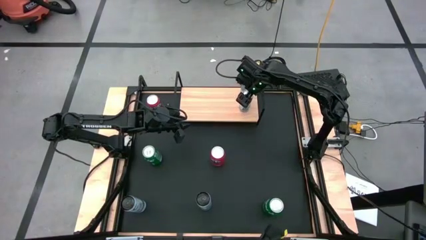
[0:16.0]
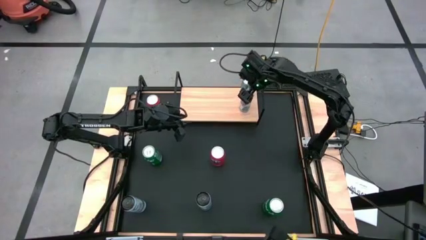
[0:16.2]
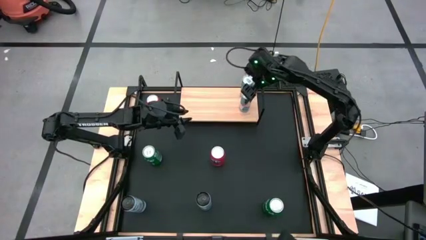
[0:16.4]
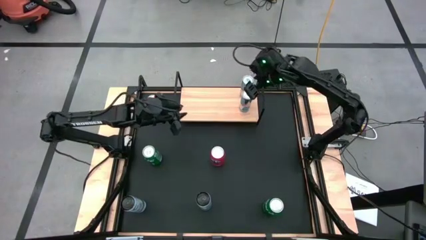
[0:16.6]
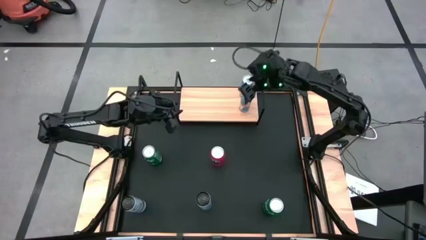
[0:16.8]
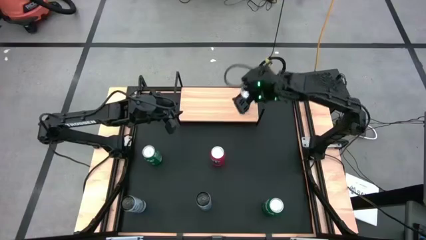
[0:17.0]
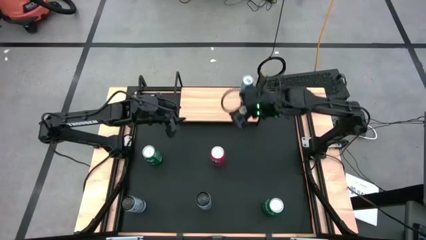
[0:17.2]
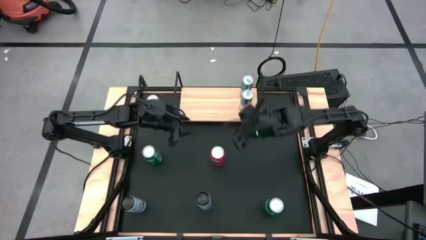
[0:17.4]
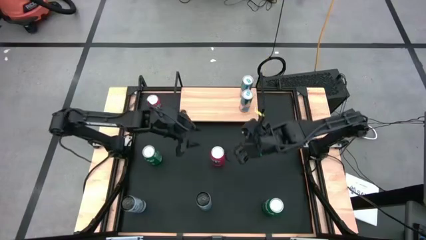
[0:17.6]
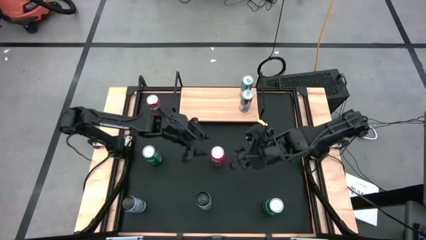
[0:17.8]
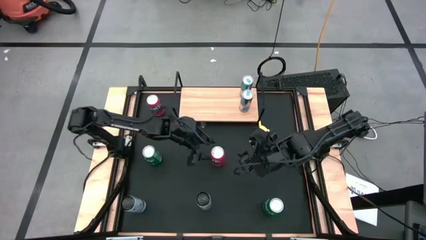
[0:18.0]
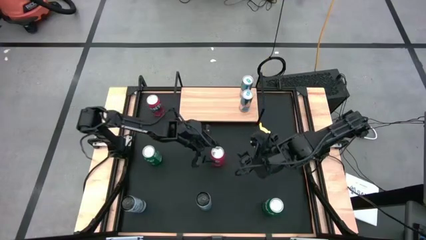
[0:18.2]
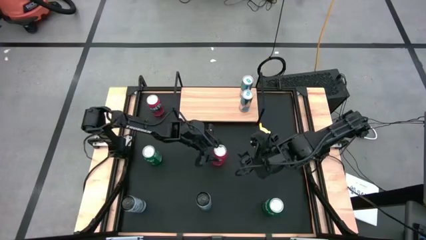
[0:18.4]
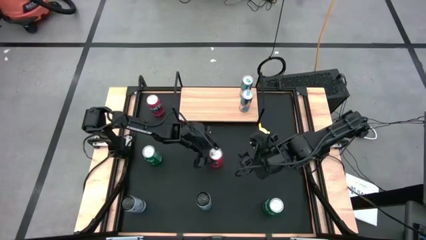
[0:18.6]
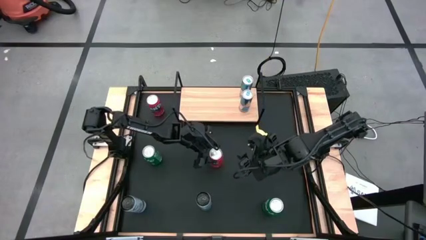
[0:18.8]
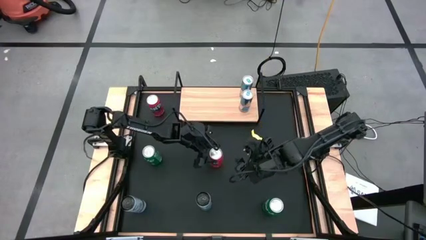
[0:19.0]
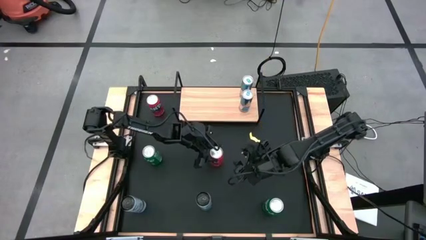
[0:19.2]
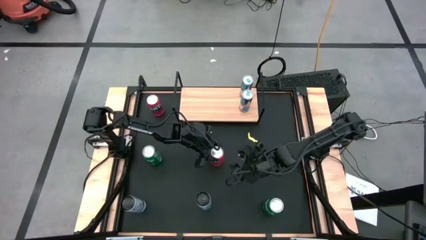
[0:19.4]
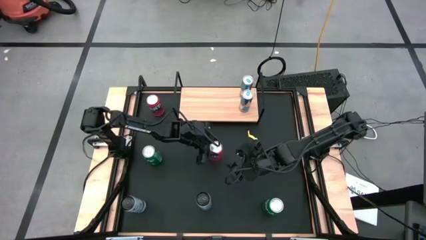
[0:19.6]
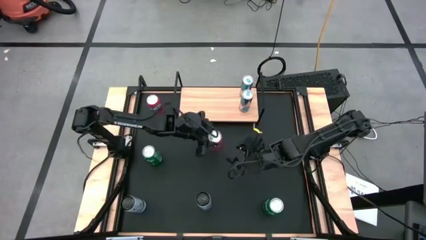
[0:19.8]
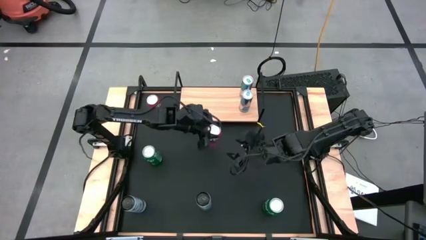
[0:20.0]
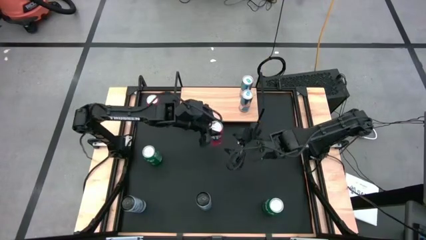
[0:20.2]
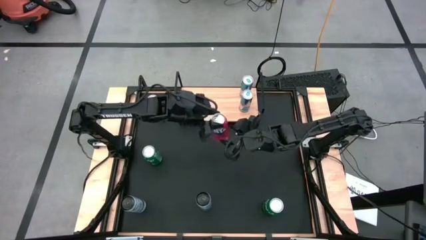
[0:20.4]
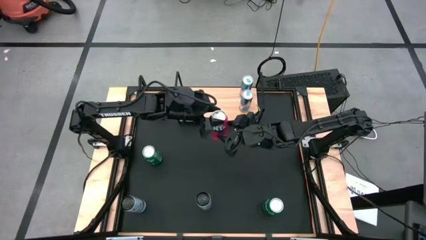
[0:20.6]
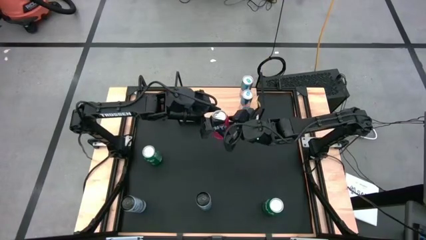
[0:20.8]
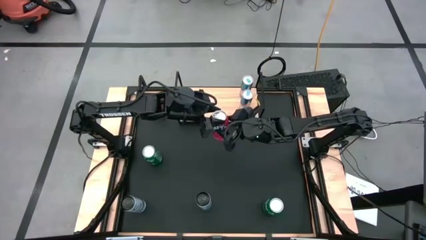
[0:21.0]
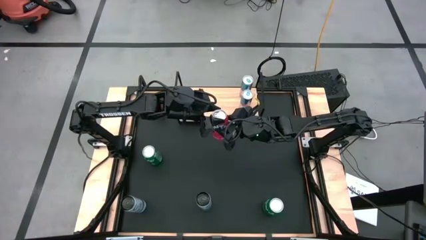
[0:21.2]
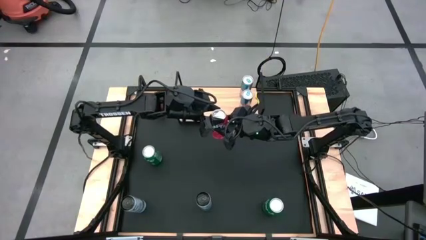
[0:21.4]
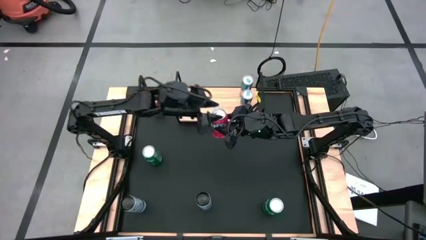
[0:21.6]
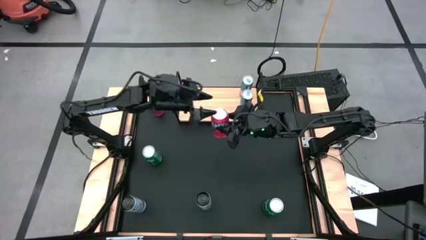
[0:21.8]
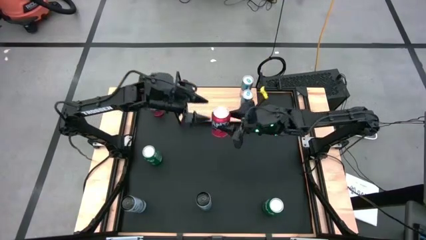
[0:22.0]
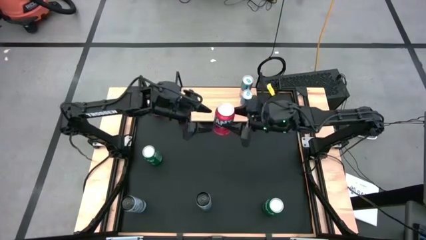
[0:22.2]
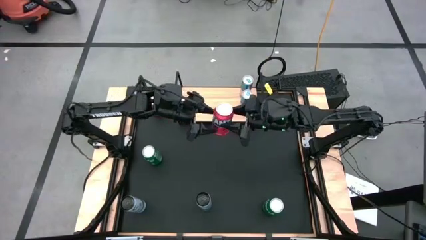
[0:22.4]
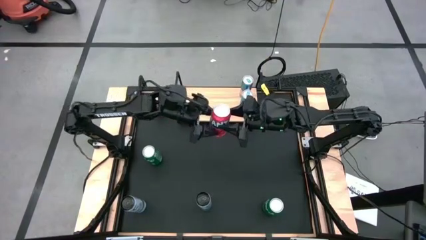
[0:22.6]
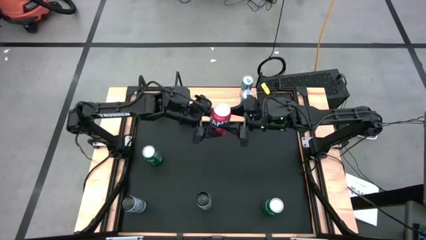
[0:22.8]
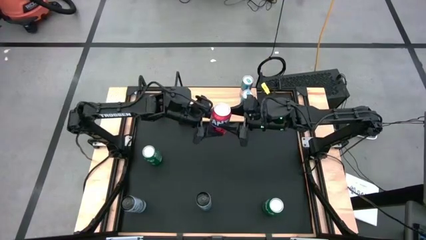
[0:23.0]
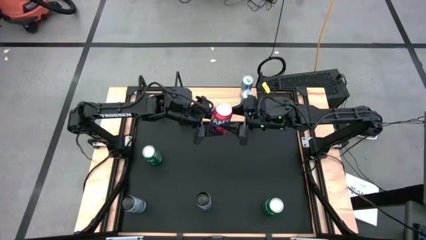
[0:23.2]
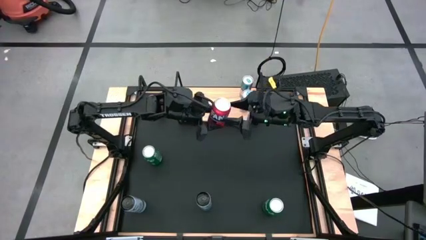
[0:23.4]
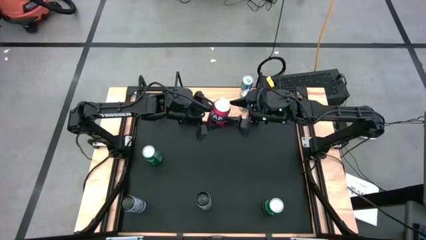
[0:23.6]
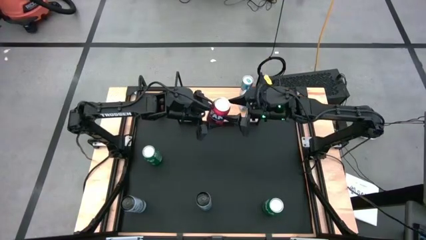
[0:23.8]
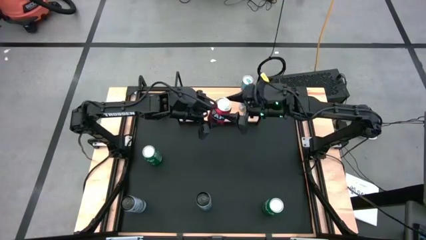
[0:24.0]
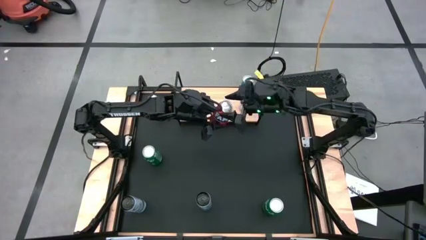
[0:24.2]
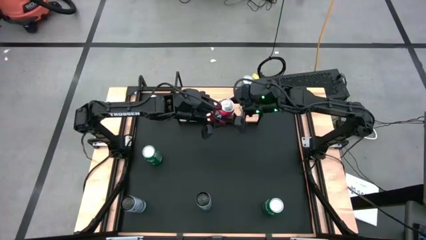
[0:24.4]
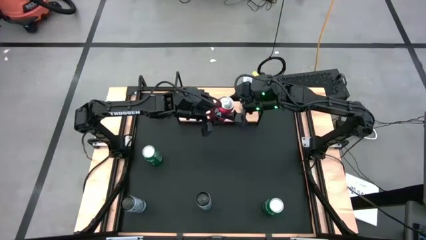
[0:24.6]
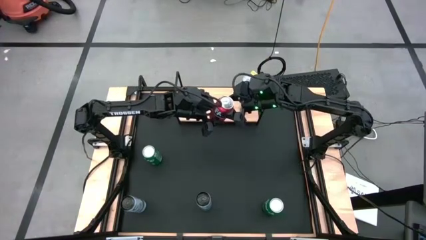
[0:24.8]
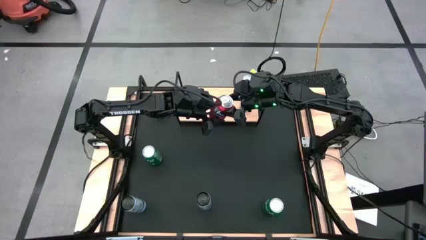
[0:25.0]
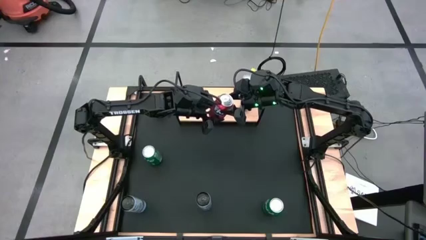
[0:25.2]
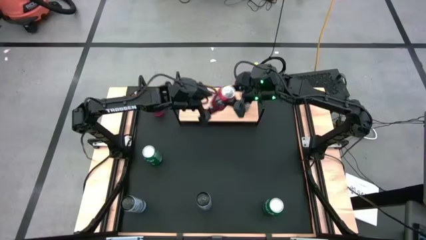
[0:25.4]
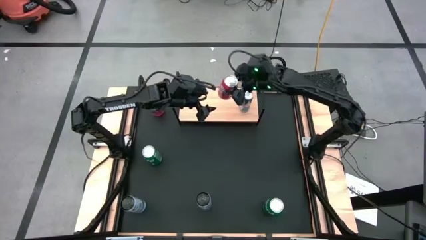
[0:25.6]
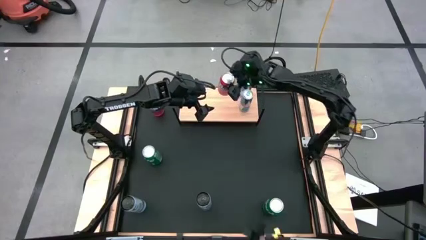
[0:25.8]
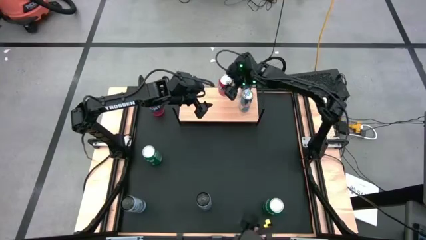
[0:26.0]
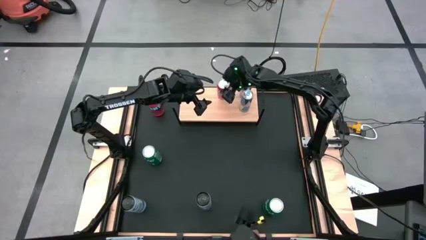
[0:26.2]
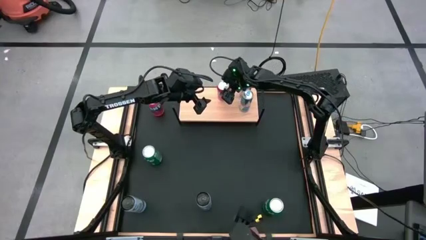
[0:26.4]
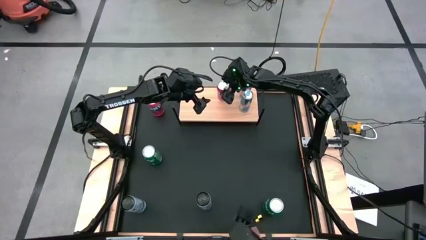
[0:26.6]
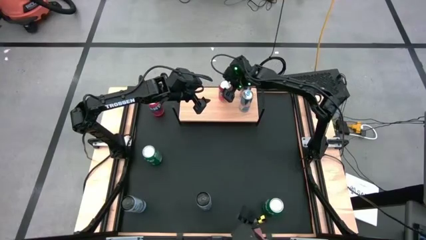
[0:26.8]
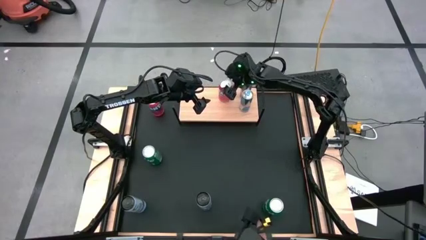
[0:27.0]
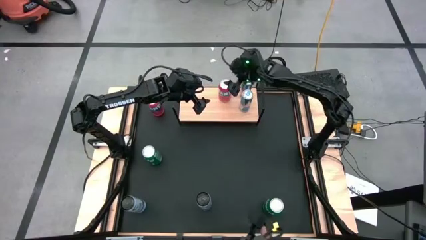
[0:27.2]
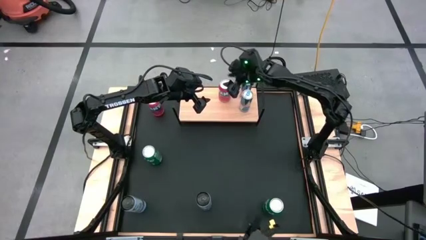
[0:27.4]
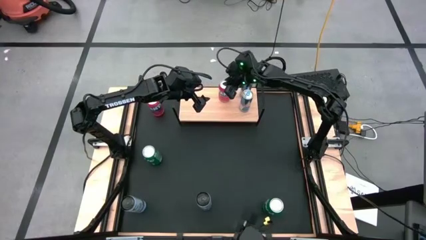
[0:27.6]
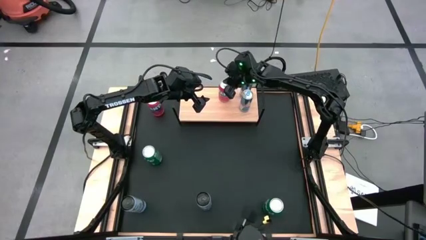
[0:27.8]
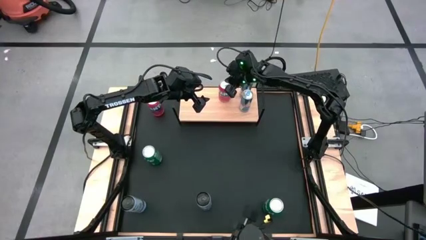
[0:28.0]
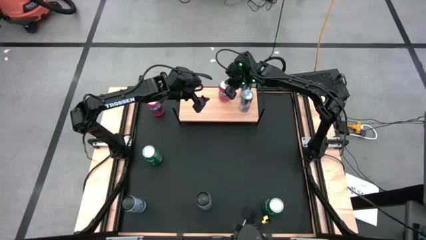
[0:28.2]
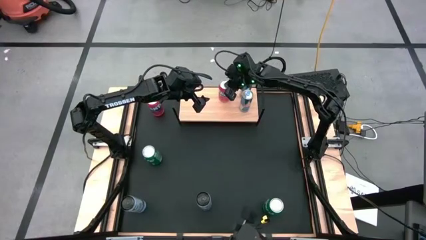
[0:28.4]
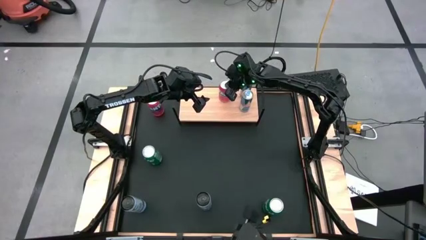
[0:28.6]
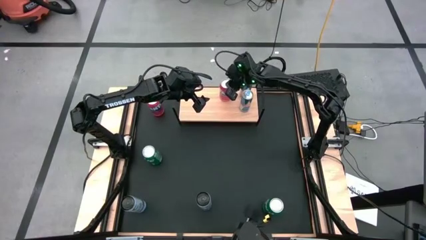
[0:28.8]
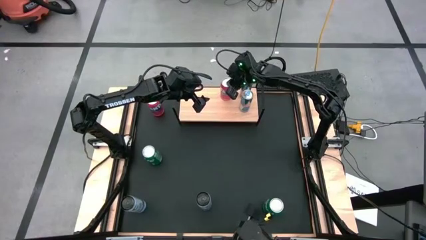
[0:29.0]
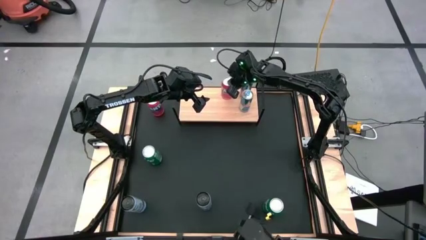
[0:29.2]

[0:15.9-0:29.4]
Task: Place canned beverage on shelf
Put the bottom red soda can on the shelf
